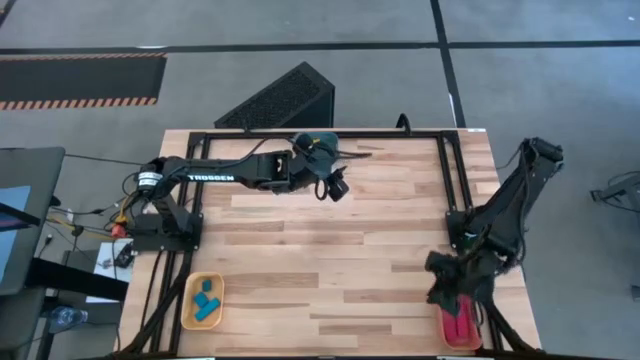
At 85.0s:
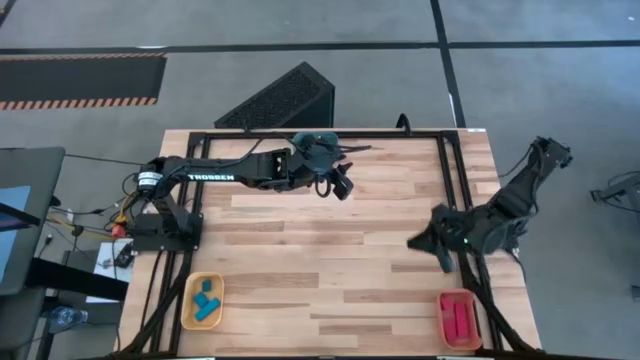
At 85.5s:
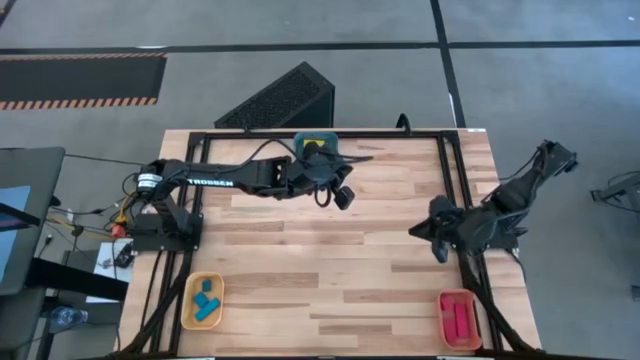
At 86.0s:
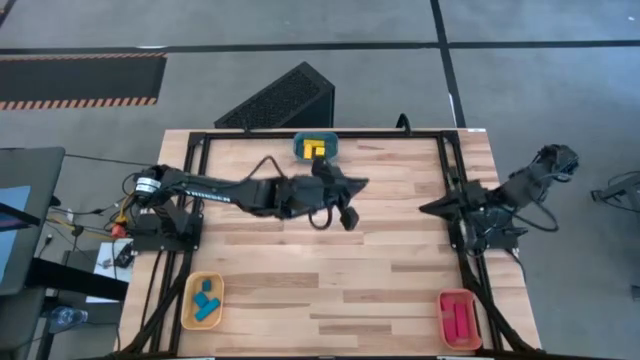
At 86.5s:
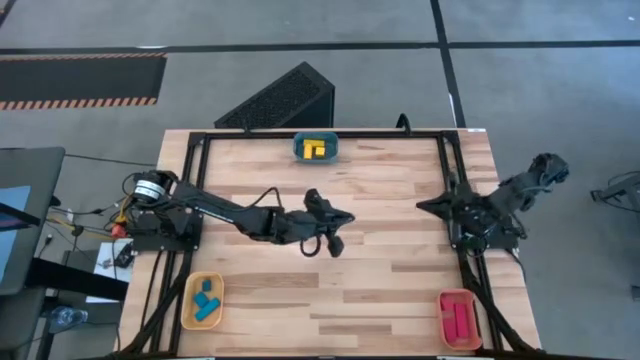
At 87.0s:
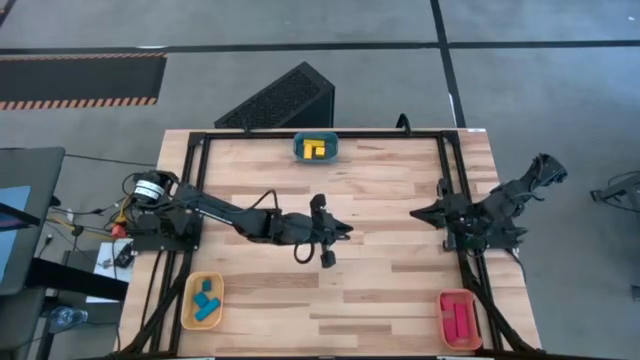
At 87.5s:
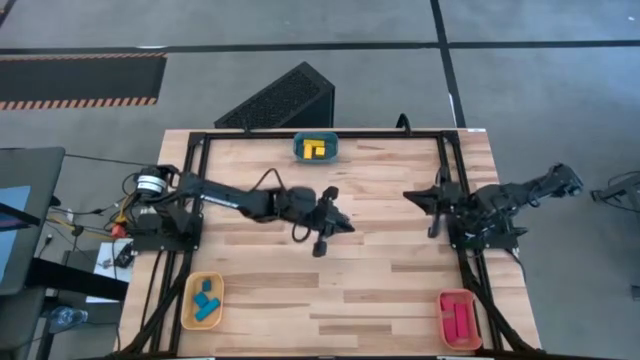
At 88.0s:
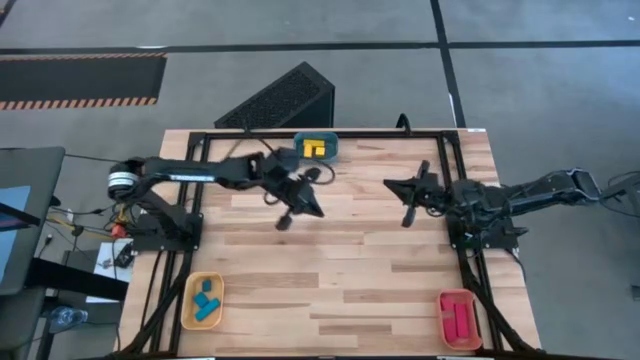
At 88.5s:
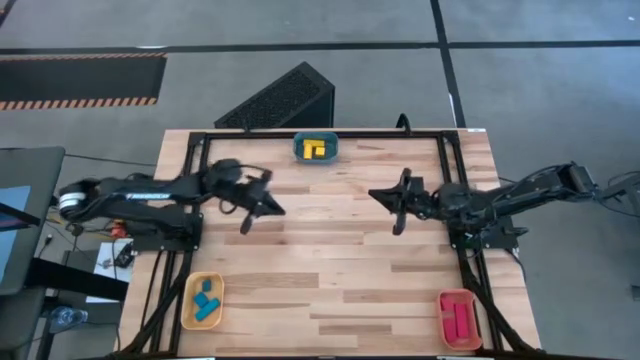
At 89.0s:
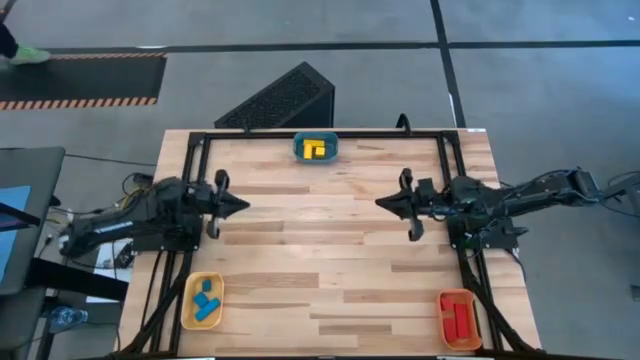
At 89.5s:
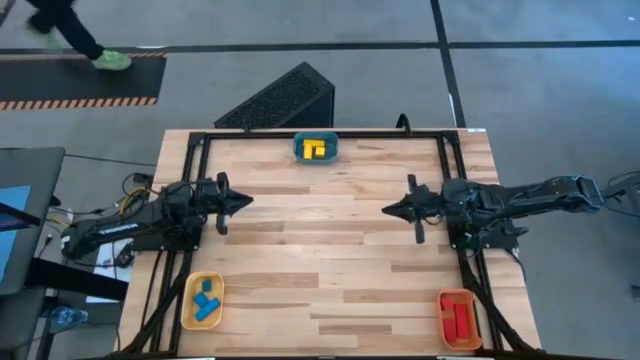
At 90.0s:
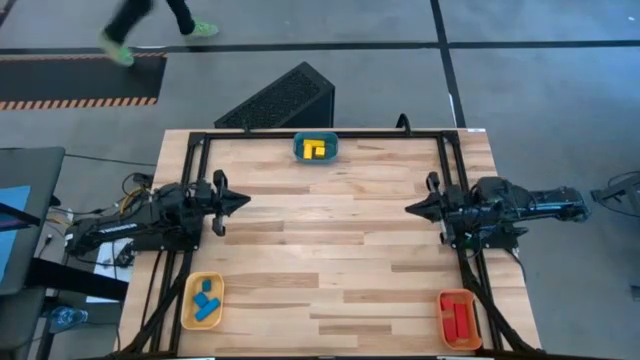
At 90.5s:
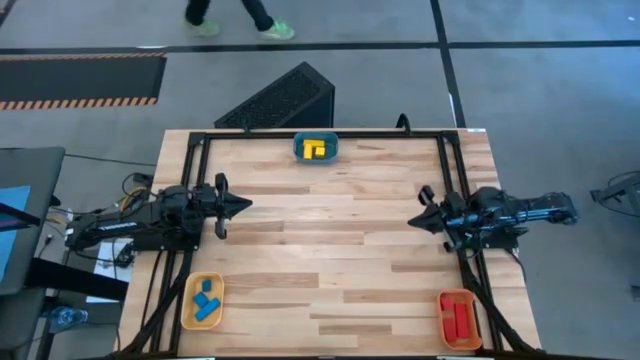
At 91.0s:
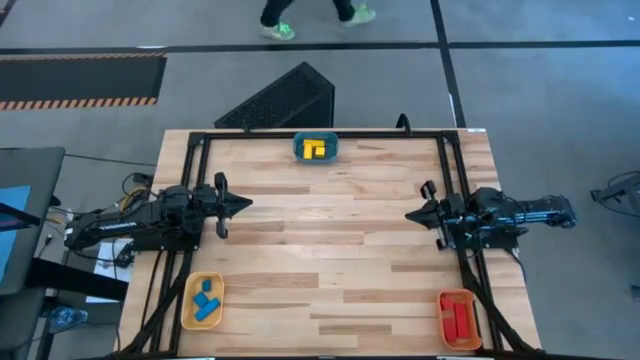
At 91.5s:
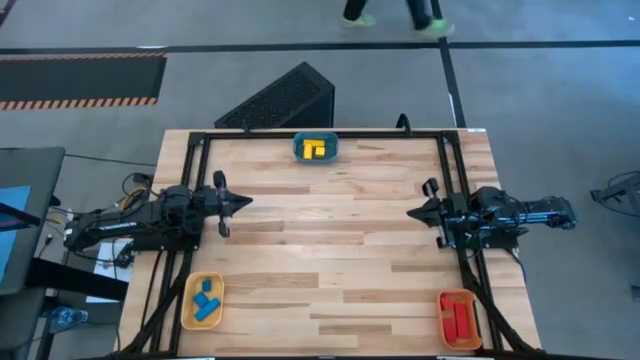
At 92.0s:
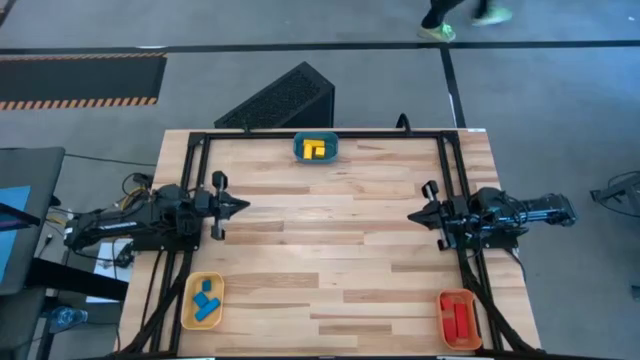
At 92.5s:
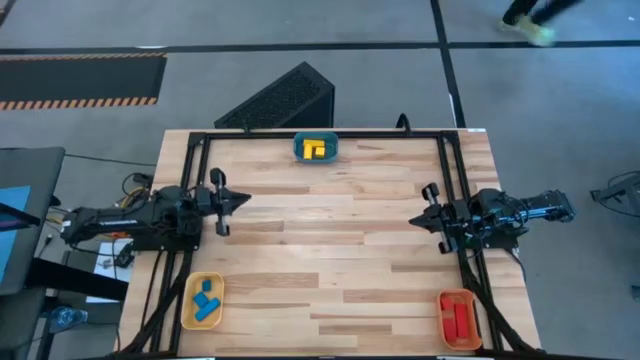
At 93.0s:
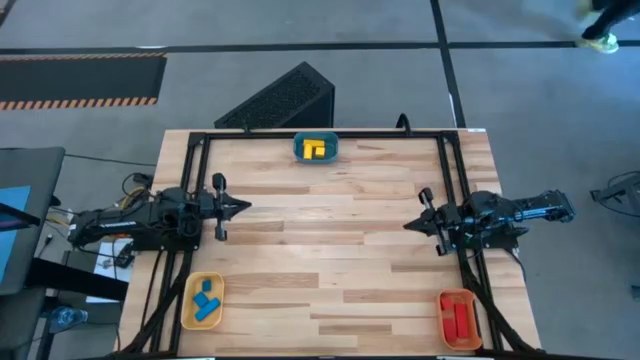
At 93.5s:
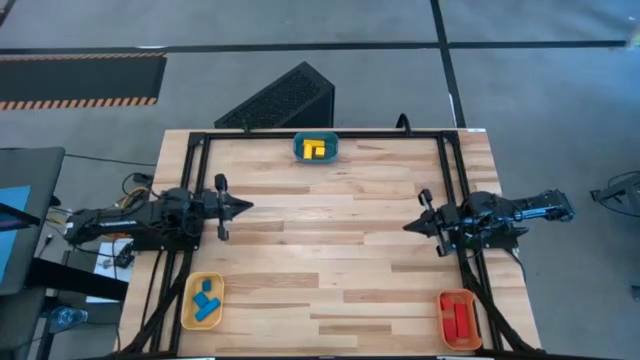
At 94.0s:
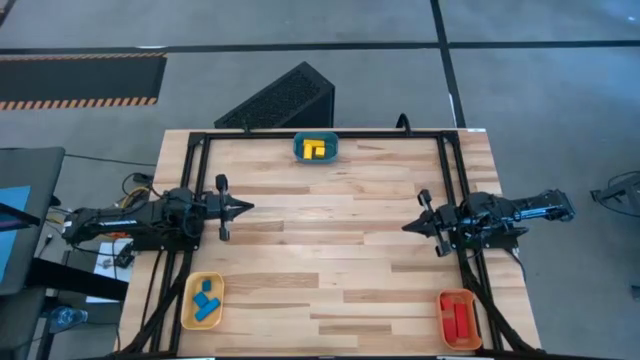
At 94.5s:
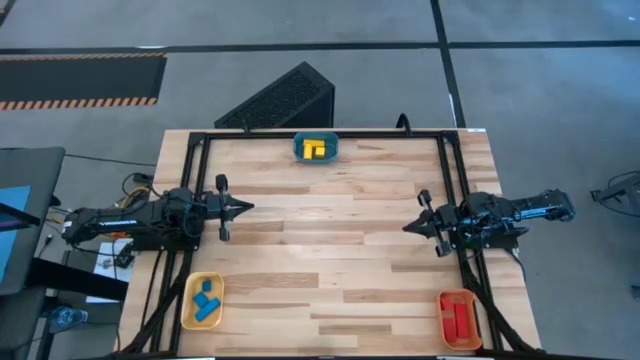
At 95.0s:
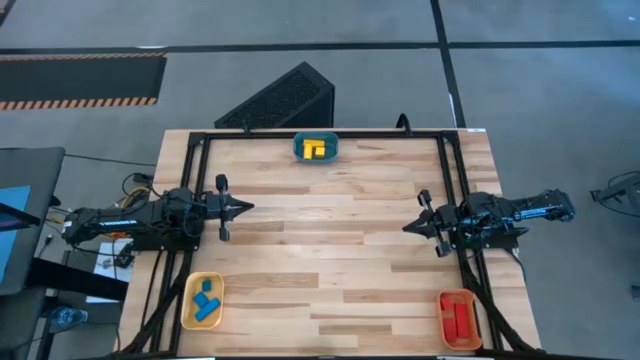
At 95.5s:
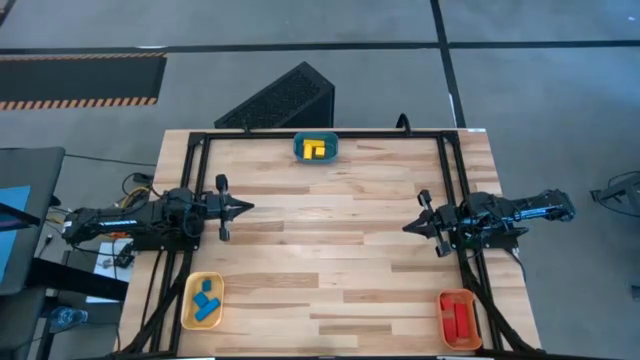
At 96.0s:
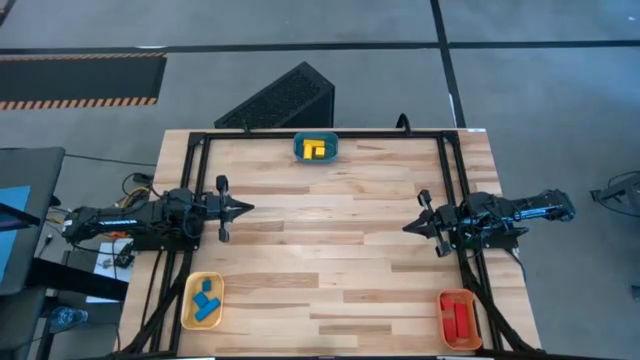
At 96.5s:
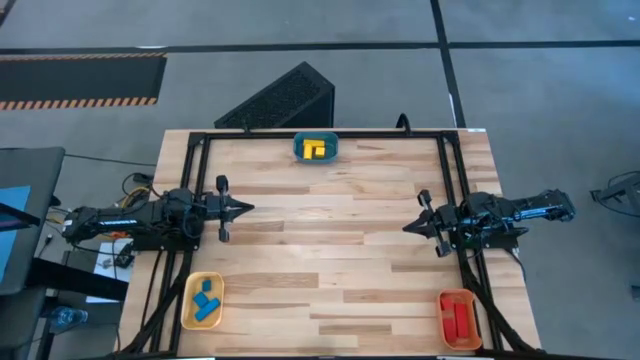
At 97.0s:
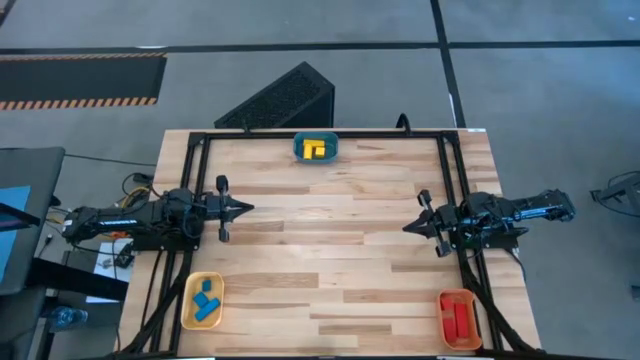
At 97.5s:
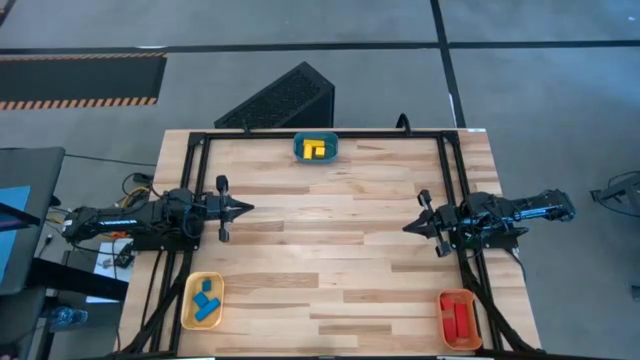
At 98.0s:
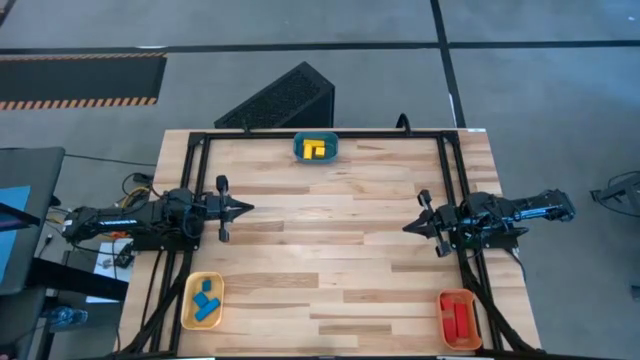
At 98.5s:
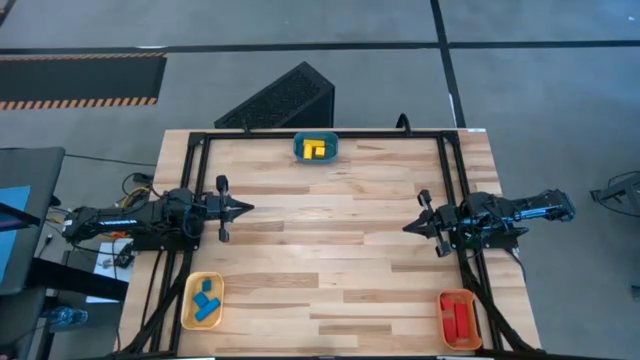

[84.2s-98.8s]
Task: Sort & place blocks by color
Return to Home Position

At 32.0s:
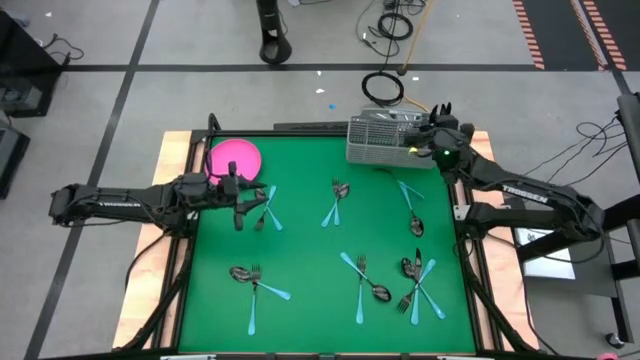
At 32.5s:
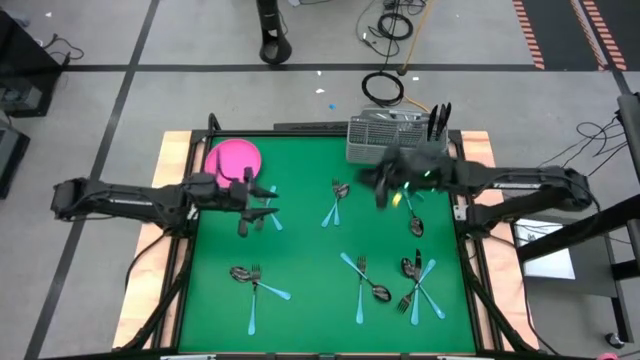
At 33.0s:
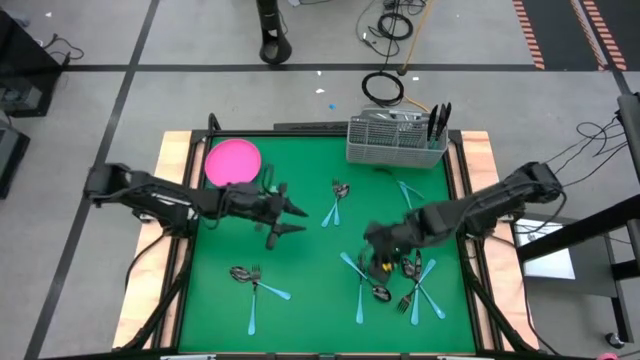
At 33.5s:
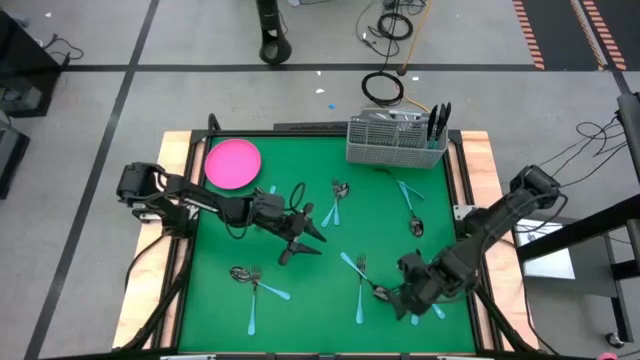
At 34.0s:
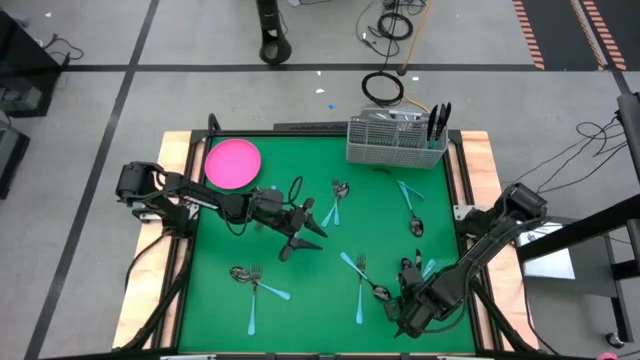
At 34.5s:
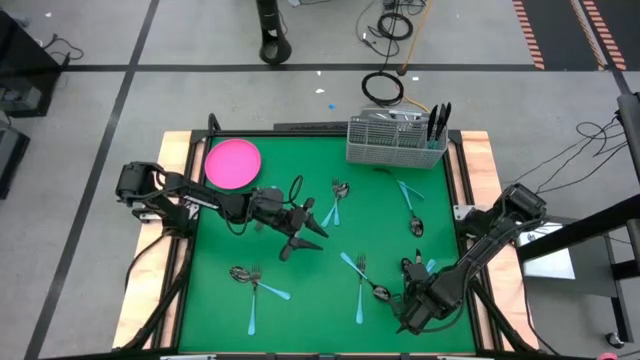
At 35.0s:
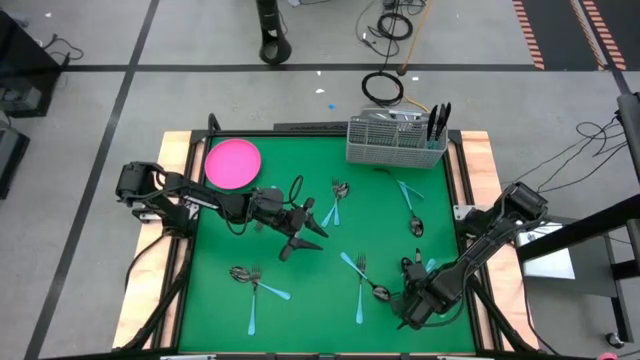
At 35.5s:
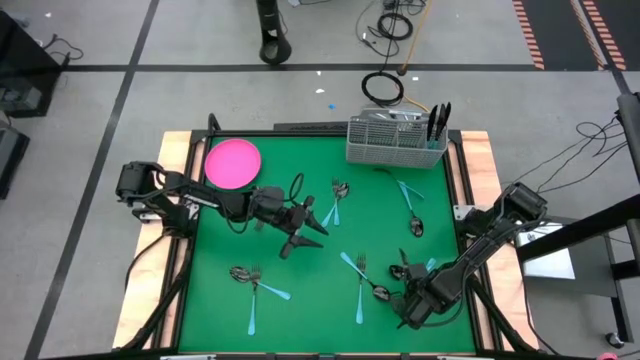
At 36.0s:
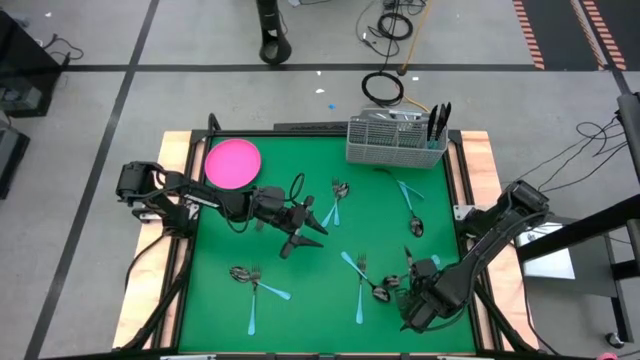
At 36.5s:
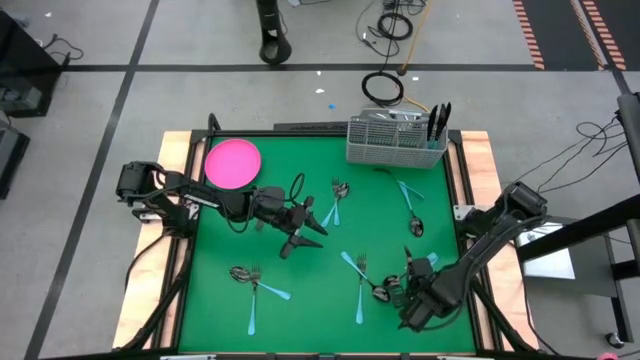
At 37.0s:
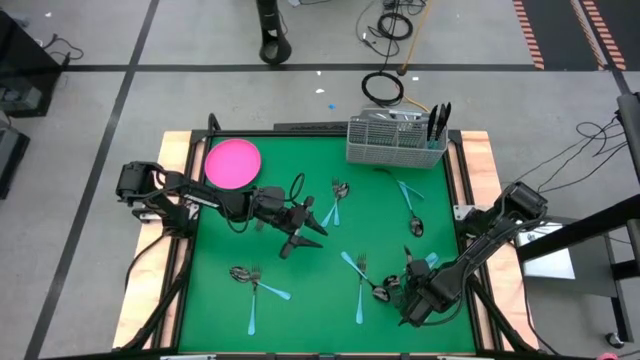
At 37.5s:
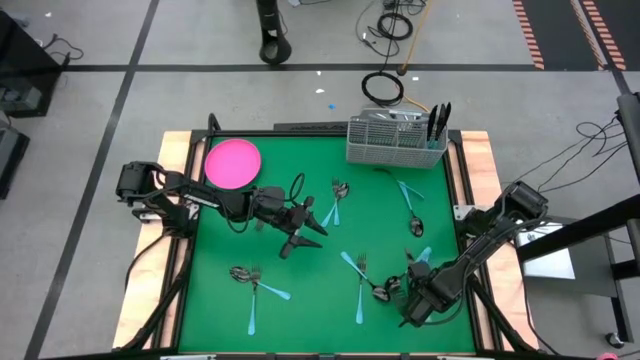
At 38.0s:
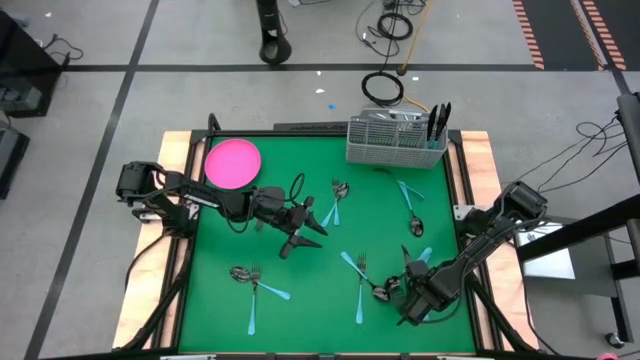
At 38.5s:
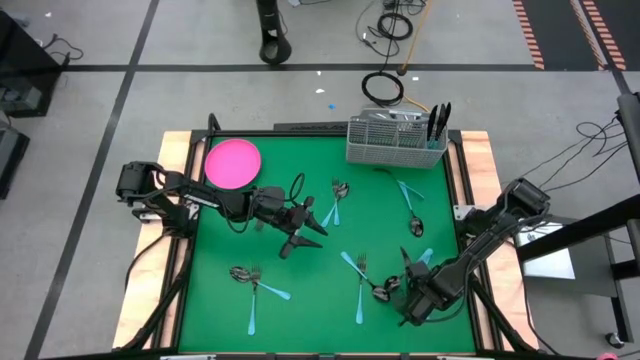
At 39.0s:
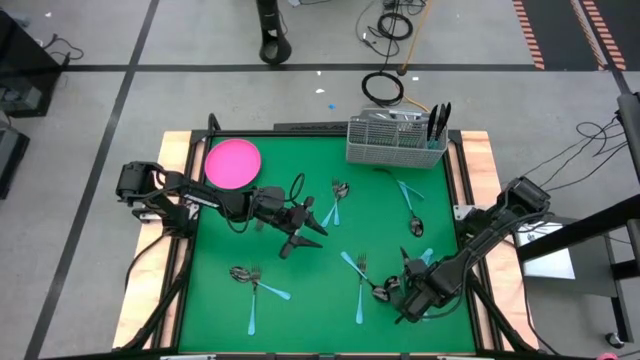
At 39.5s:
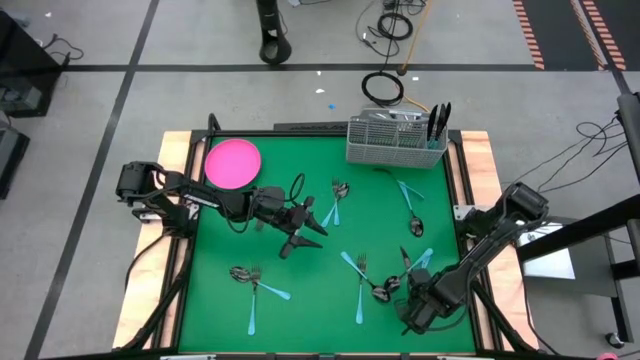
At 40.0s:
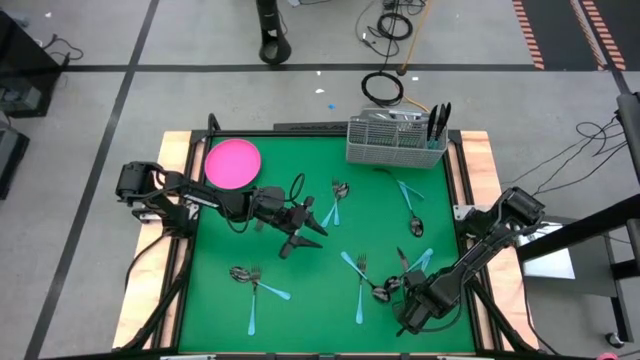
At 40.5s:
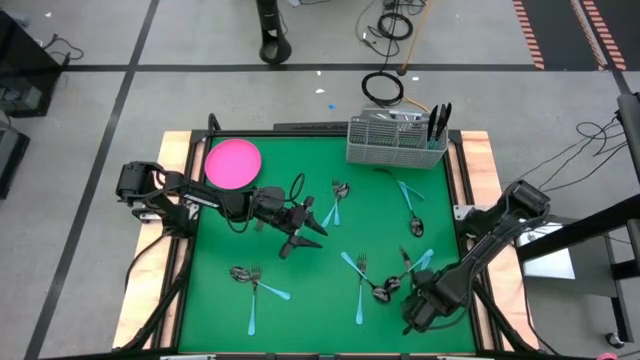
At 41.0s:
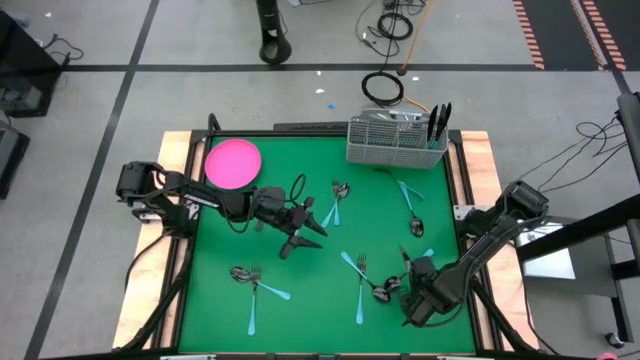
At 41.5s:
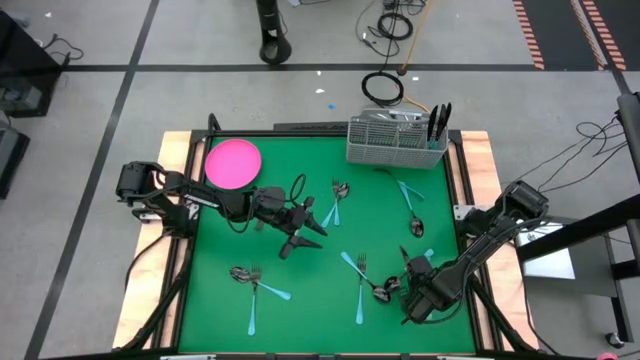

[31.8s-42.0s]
Task: Sort silverware
Put the blue table knife into the gray silverware basket
